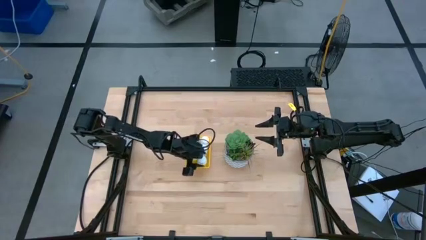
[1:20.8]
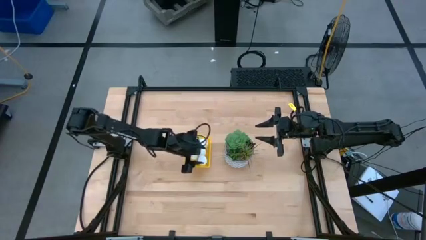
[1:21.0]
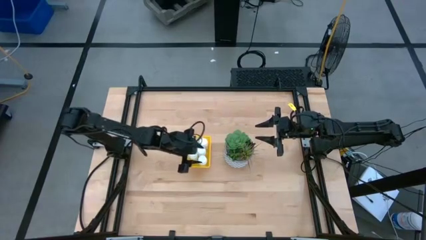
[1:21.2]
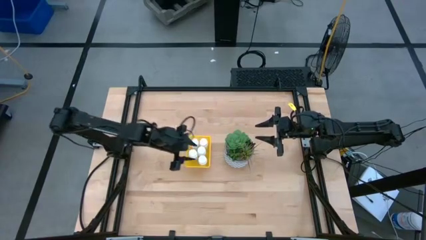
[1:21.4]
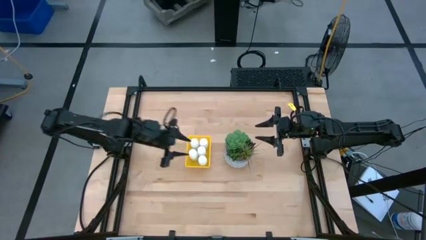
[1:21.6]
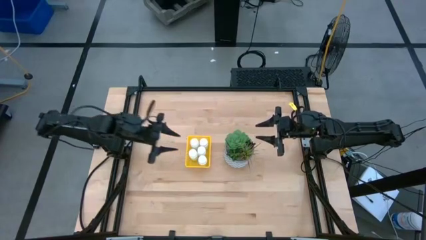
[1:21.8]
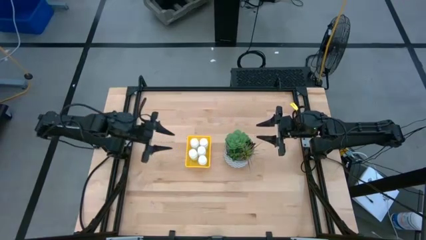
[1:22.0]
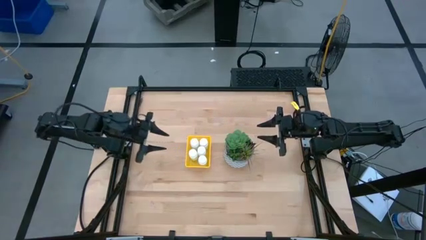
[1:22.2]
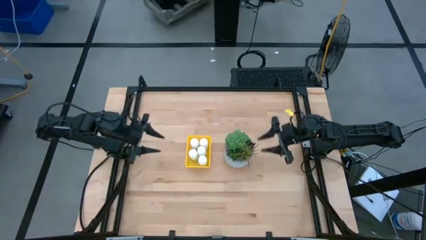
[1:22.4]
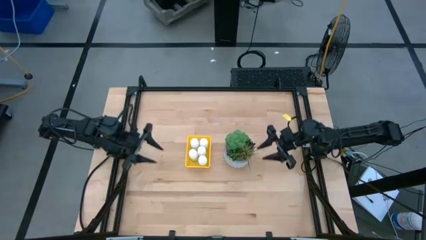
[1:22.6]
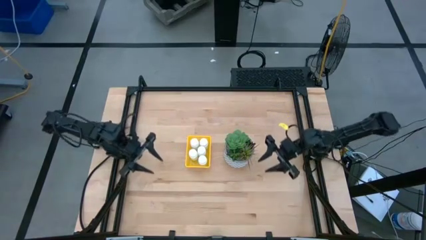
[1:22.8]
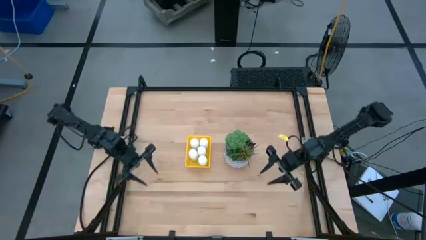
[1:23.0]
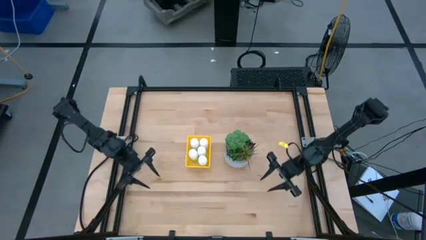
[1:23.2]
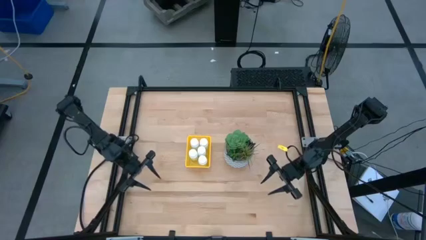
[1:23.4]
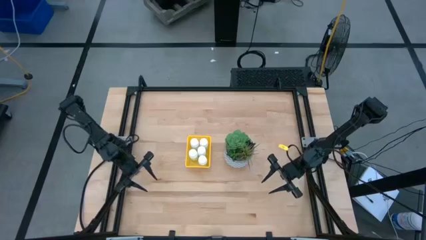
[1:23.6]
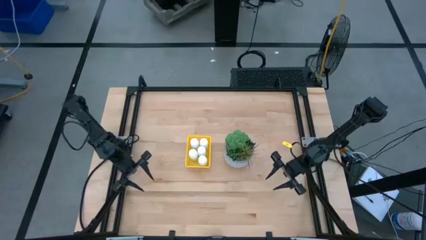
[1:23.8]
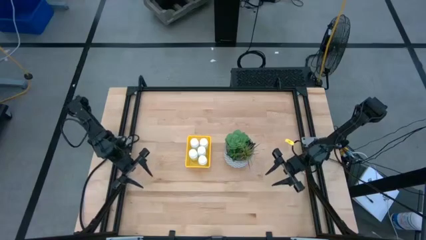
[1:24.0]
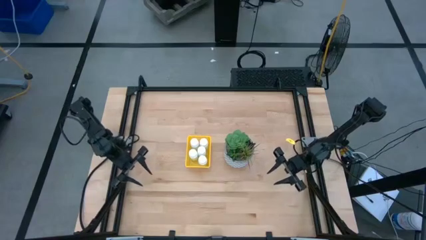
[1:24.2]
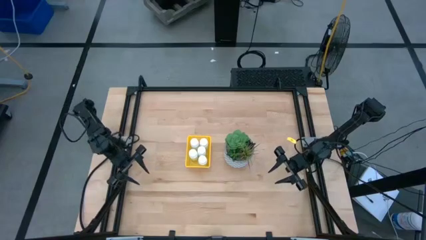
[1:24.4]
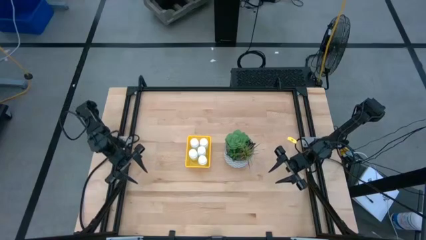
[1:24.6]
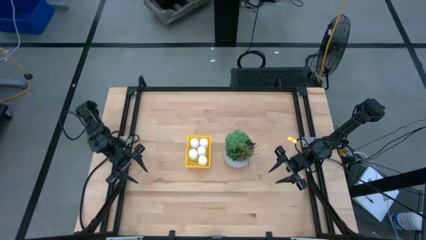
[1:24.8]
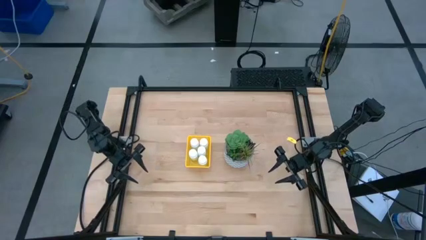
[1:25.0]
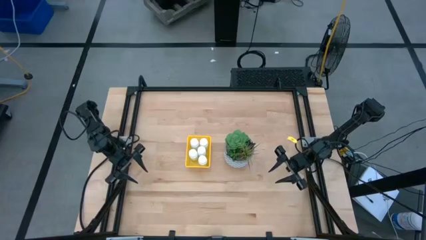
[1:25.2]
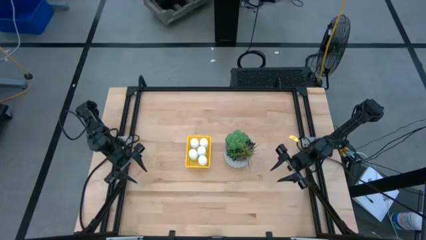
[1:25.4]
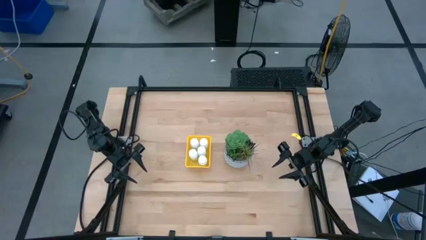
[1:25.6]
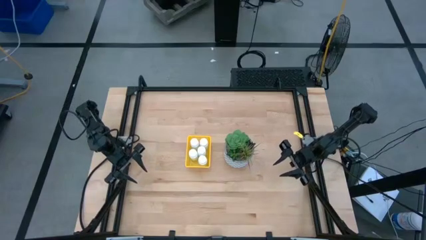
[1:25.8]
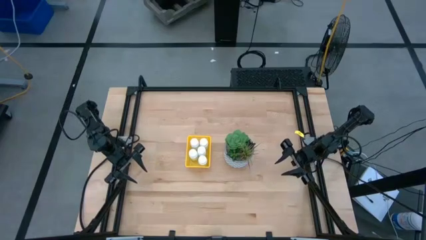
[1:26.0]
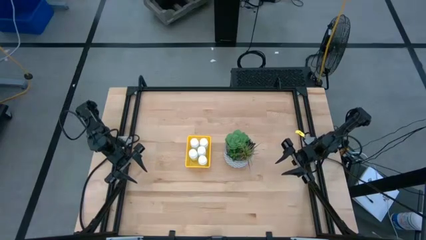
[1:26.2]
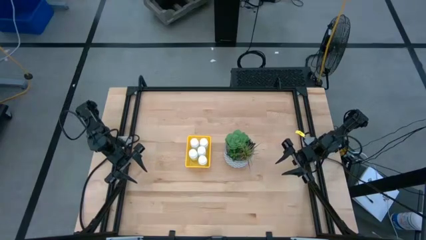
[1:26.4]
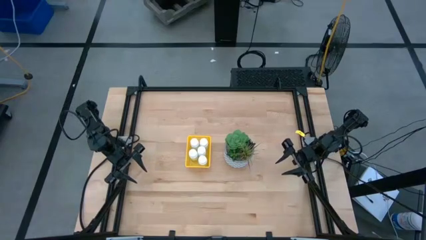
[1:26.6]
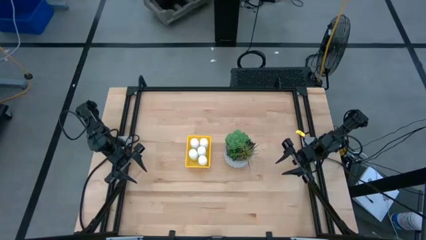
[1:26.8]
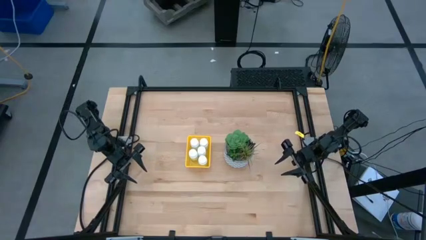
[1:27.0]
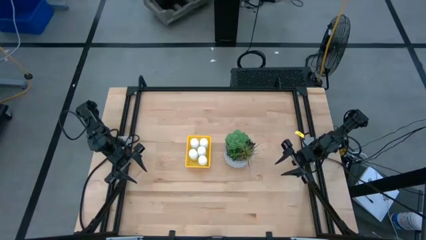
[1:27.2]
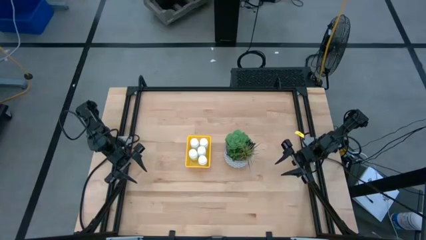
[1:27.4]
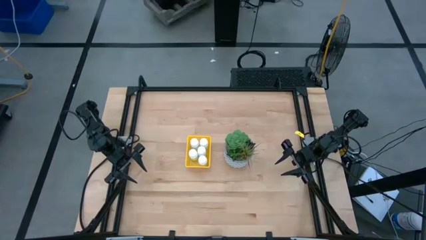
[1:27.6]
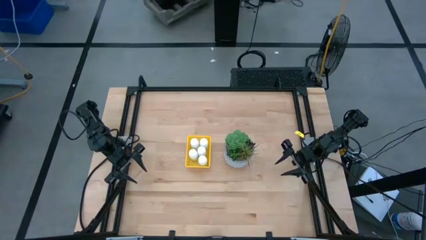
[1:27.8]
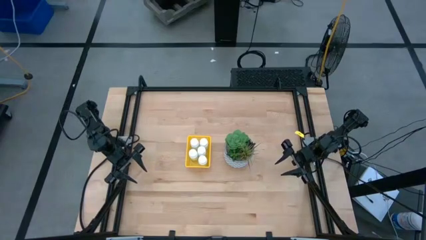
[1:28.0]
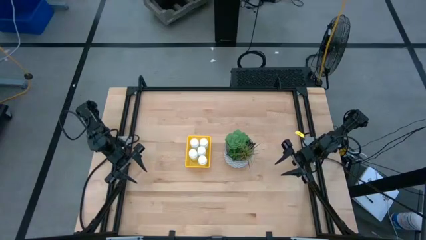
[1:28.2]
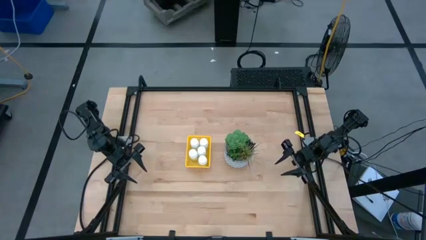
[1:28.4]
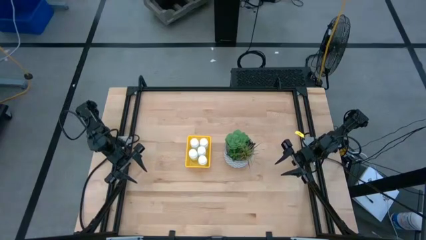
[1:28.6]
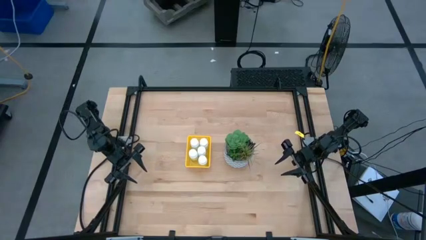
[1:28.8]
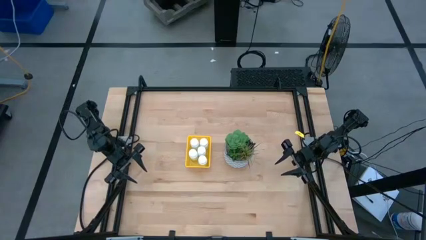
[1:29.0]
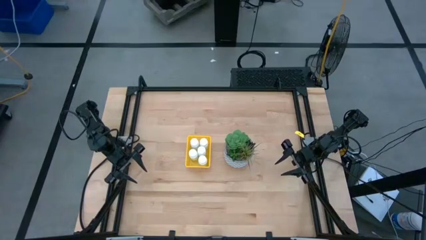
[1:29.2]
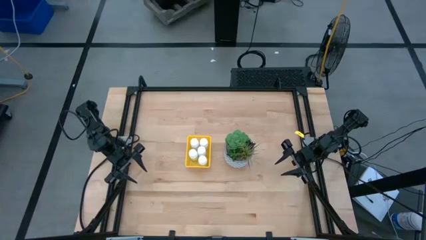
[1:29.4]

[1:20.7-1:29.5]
Task: Pick and place pill bottles into a basket
Return to Home Position

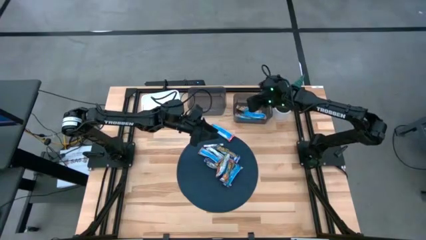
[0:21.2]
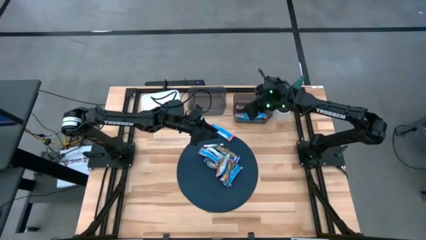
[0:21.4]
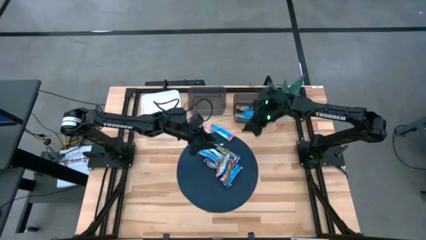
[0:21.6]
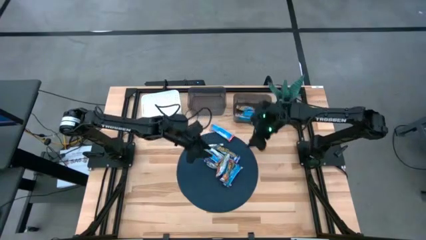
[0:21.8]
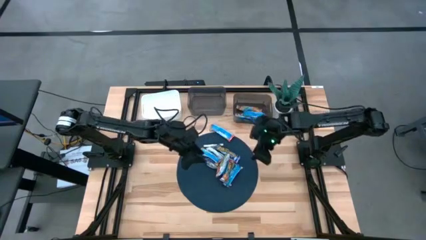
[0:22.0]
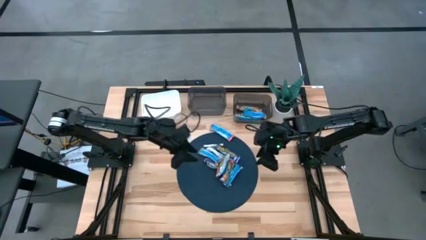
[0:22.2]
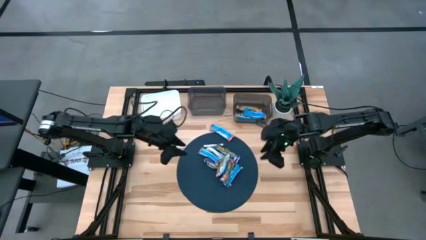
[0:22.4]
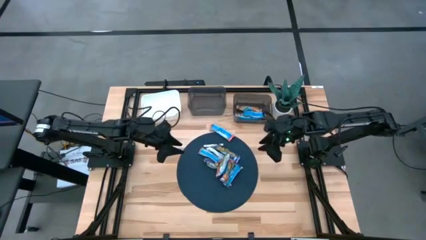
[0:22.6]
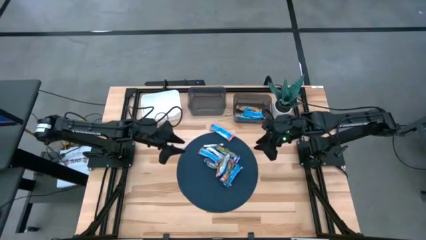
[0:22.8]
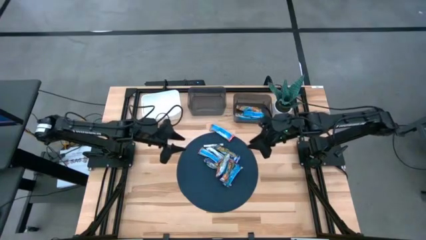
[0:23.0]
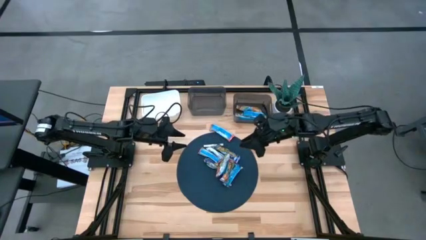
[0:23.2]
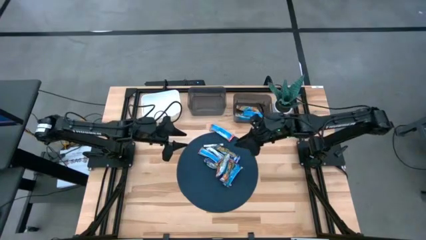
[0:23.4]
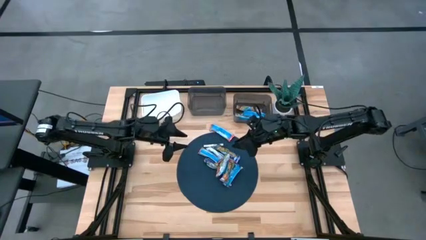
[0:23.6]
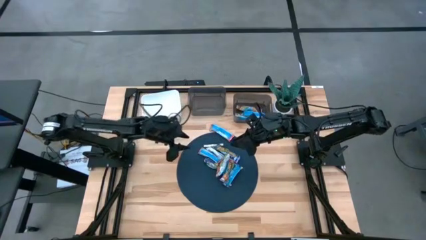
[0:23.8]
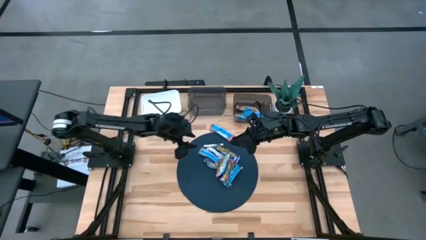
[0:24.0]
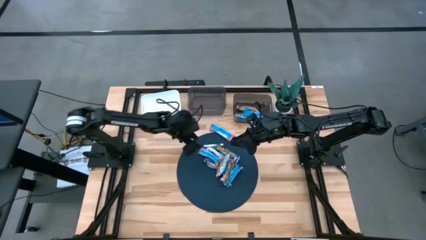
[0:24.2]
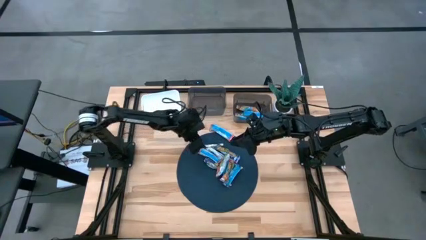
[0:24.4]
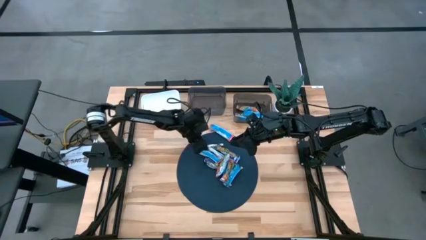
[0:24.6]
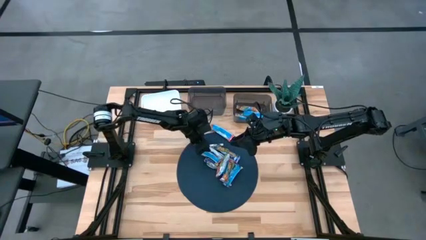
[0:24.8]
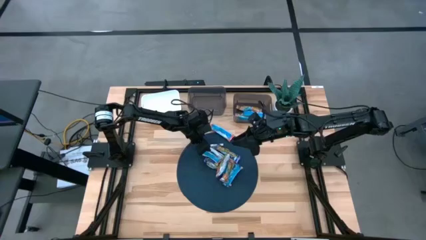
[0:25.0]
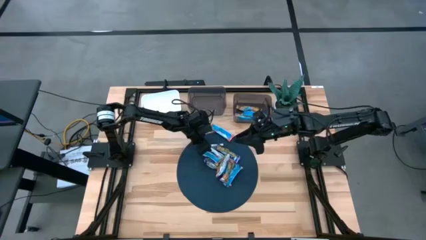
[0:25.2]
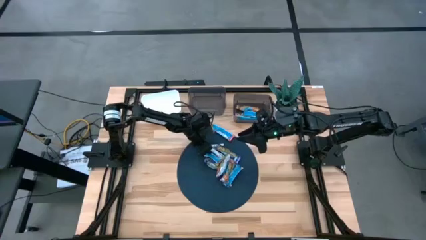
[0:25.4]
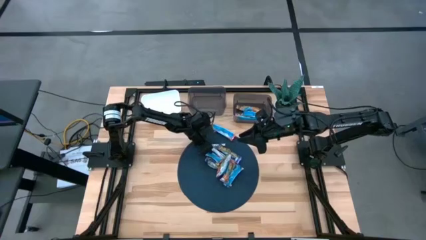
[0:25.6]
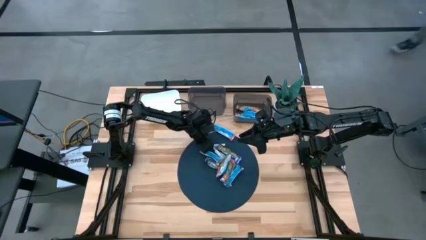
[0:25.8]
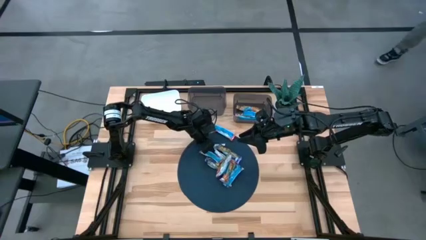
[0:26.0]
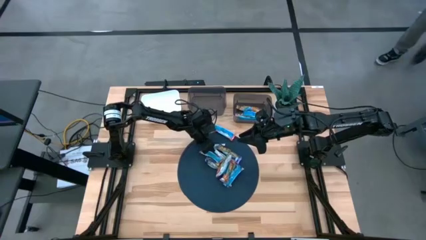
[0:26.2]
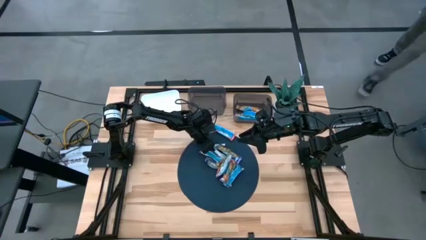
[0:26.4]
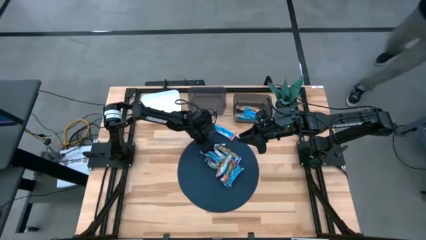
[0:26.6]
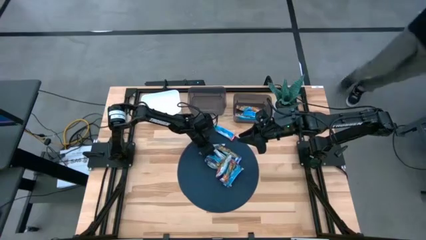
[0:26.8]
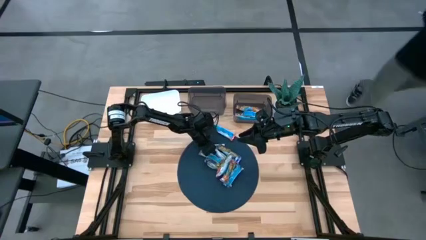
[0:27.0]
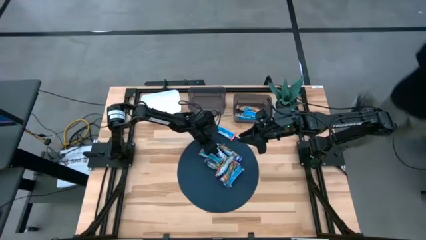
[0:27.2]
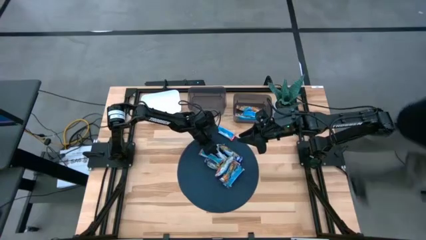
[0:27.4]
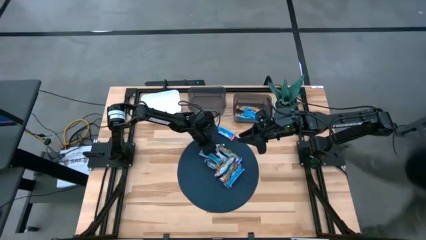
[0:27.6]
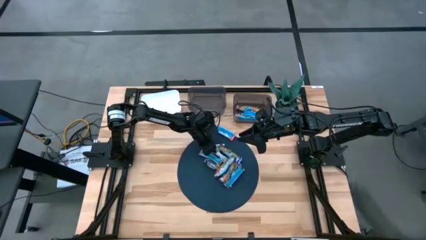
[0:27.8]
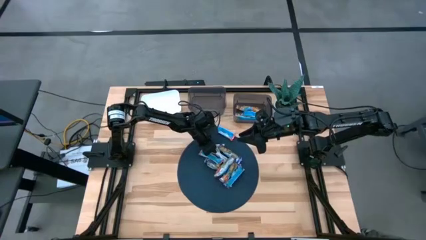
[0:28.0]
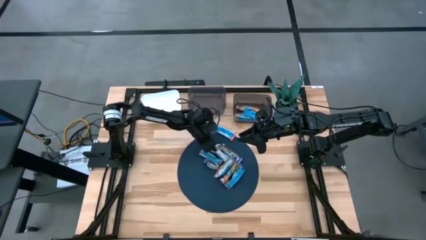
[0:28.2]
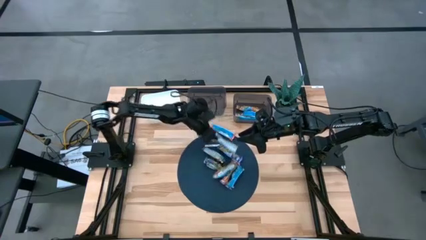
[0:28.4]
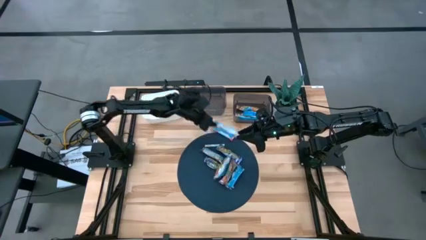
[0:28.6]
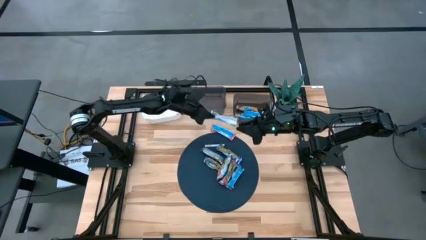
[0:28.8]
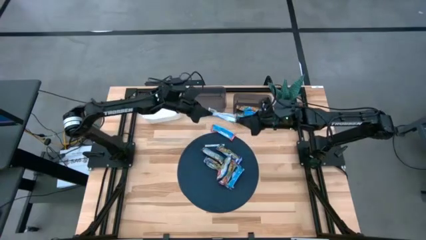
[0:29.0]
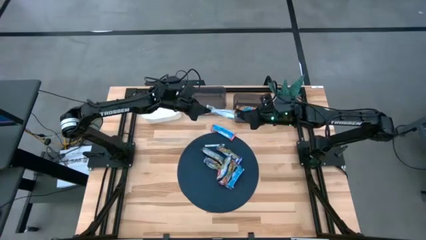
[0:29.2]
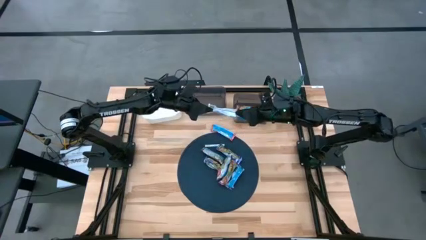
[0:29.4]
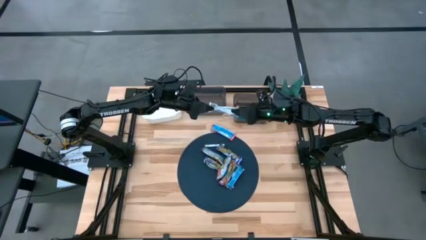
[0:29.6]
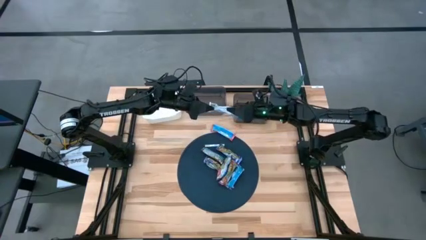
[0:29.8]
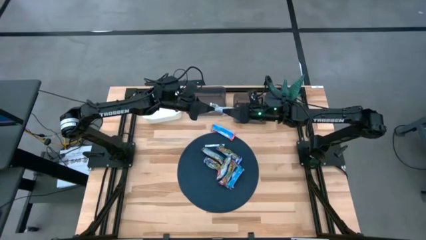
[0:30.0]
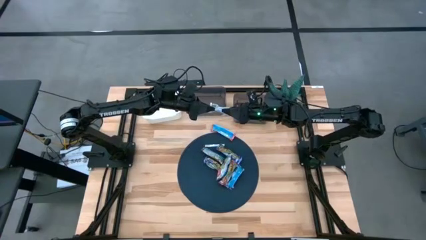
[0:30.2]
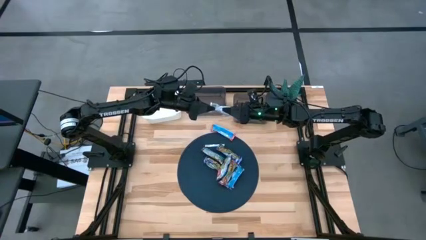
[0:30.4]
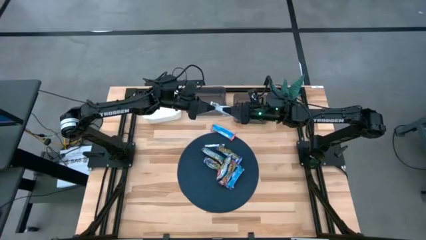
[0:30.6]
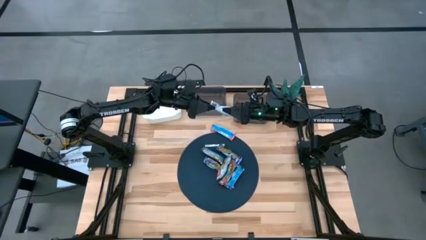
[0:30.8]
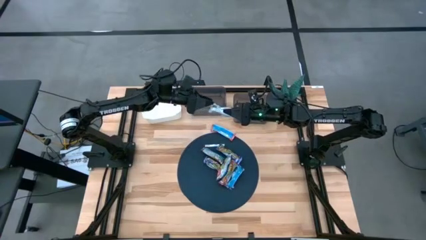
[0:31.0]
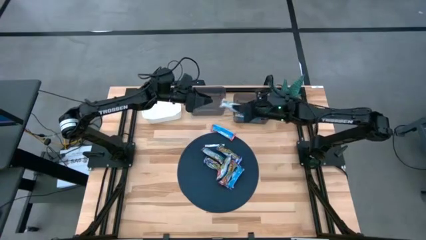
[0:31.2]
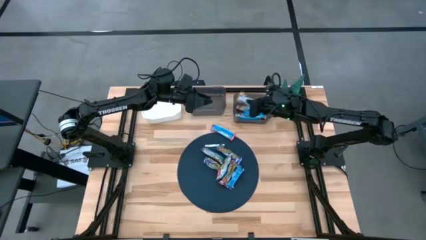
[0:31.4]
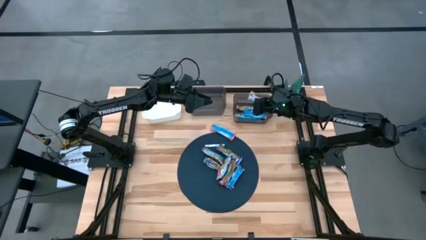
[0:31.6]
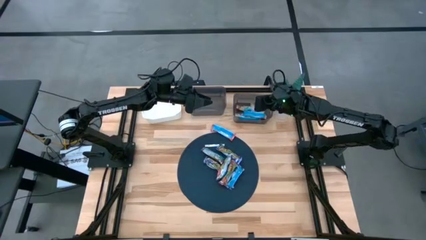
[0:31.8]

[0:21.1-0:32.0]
Task: Pick and place Granola Bars by type
Put the yellow granola bar into the right black bin
